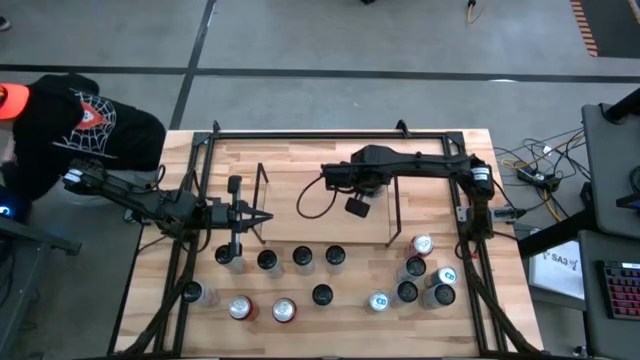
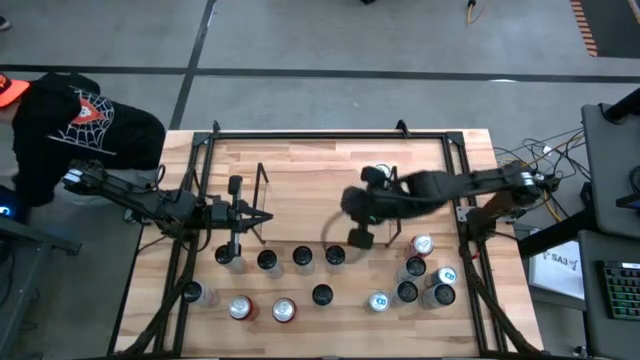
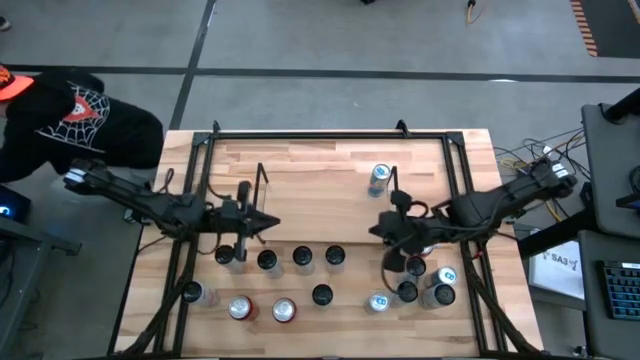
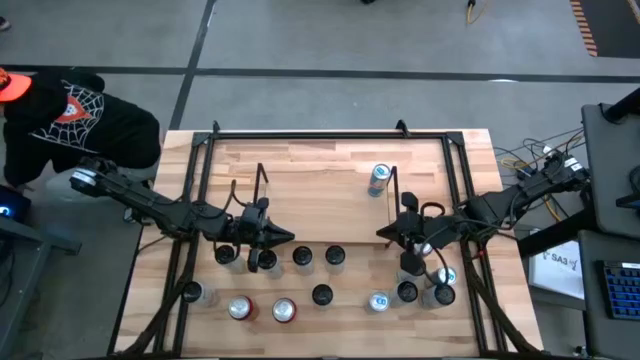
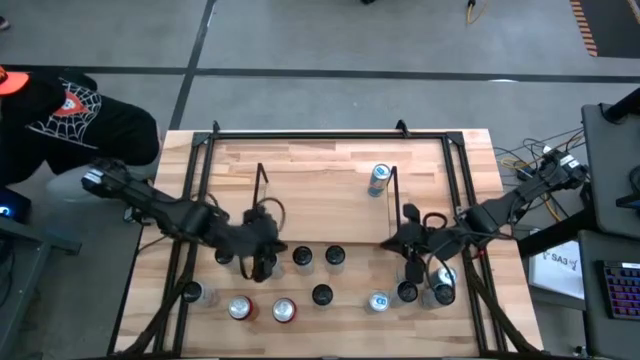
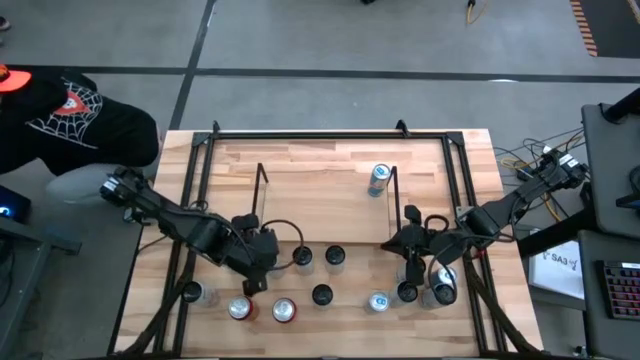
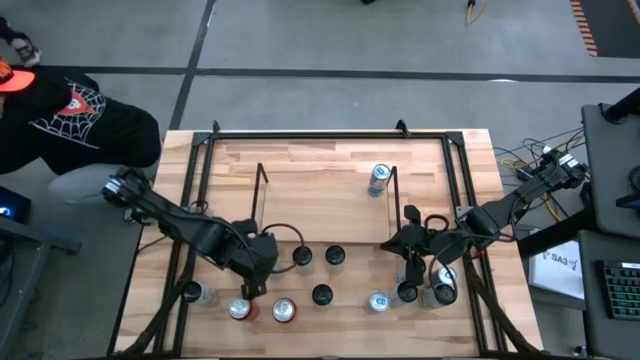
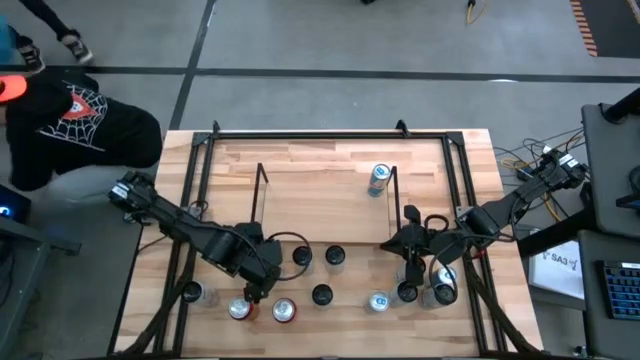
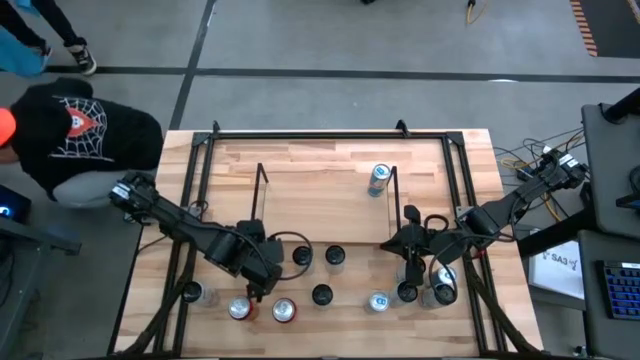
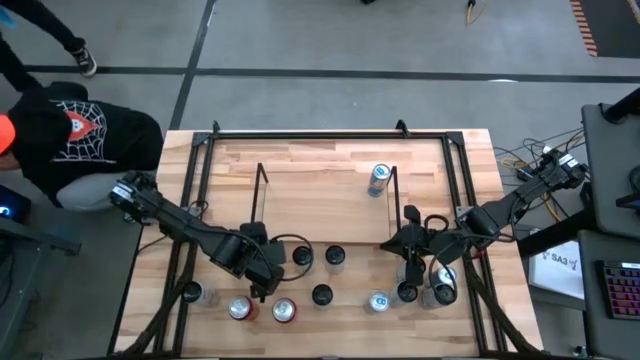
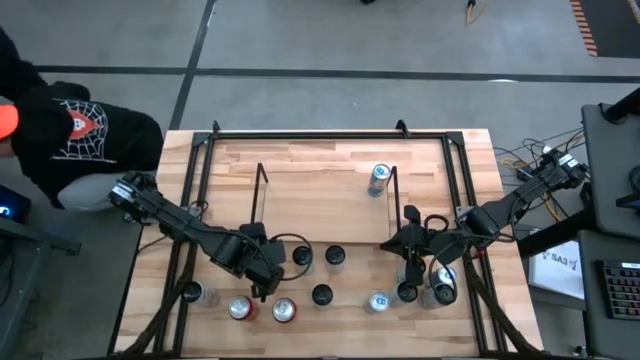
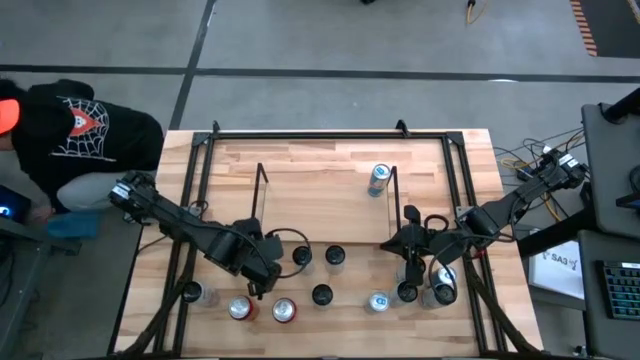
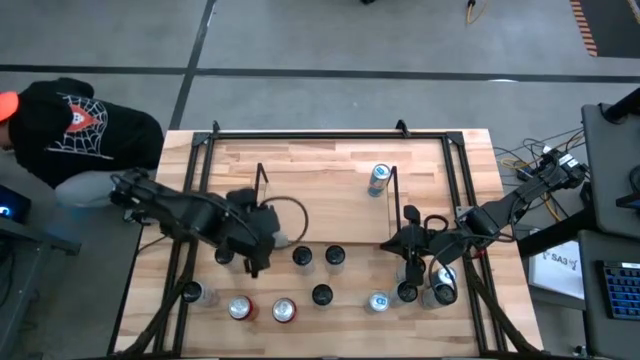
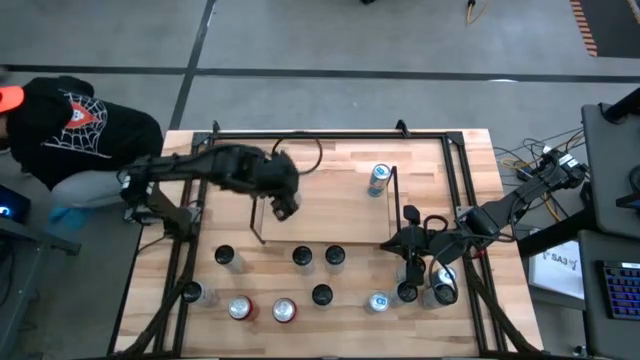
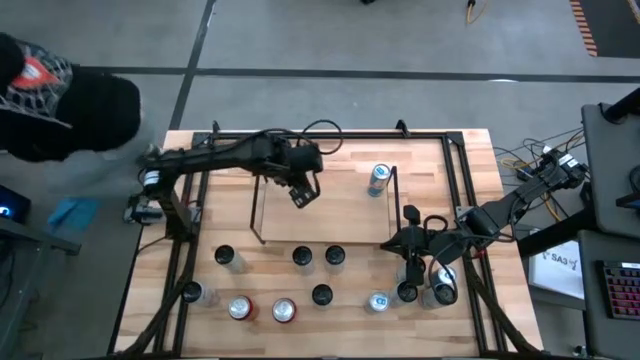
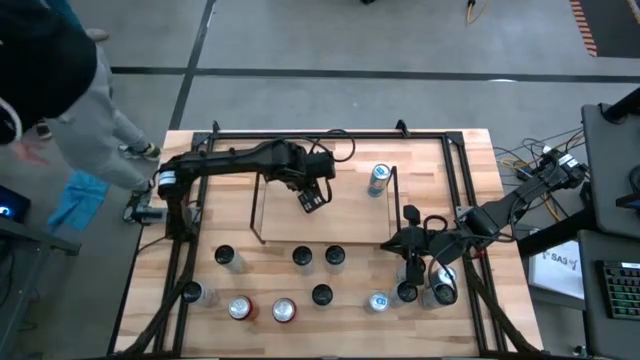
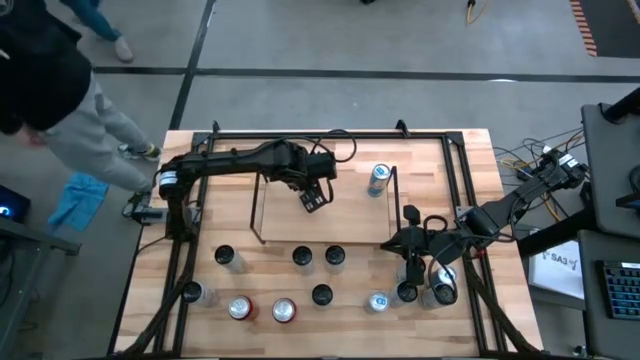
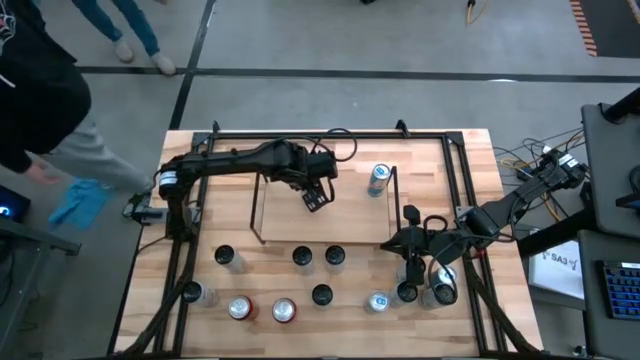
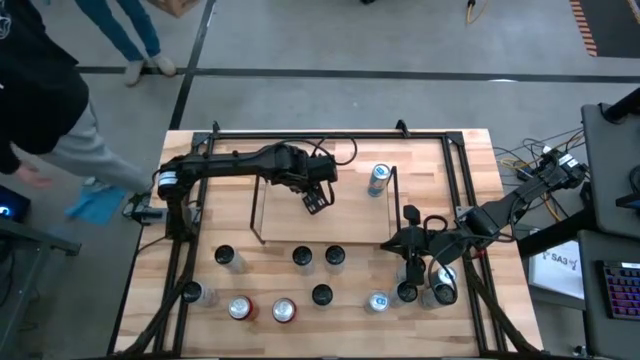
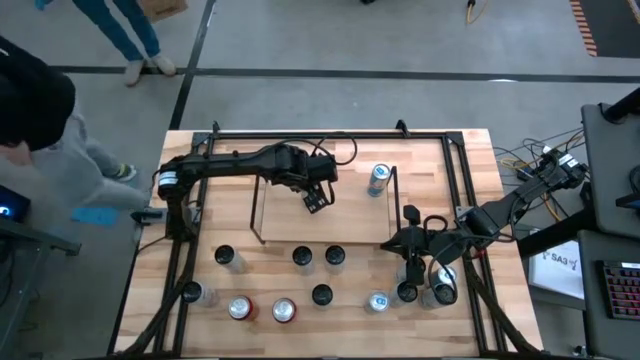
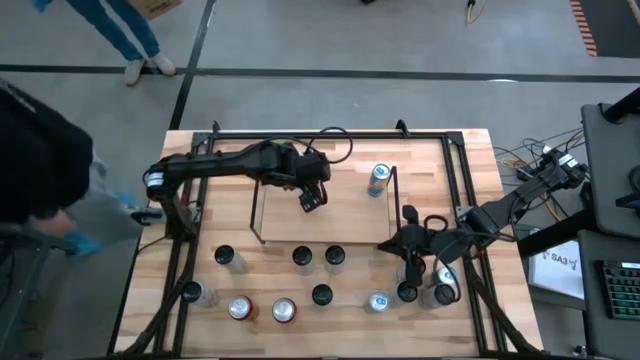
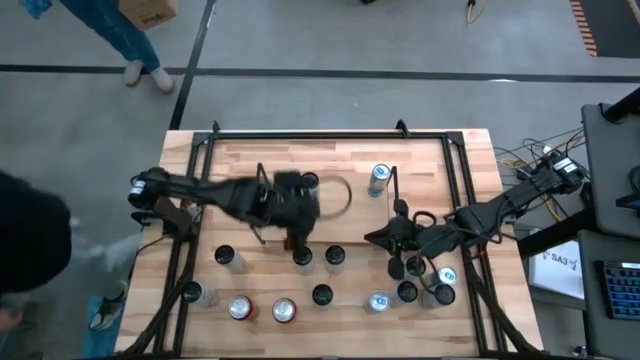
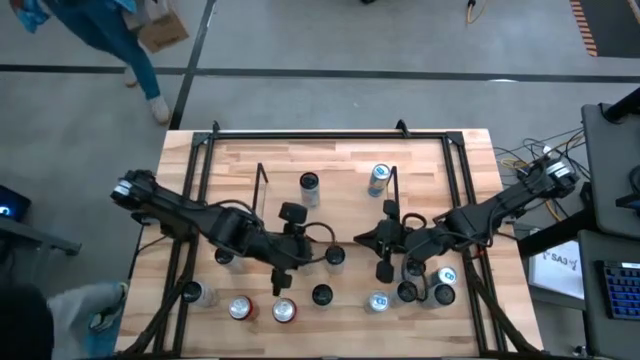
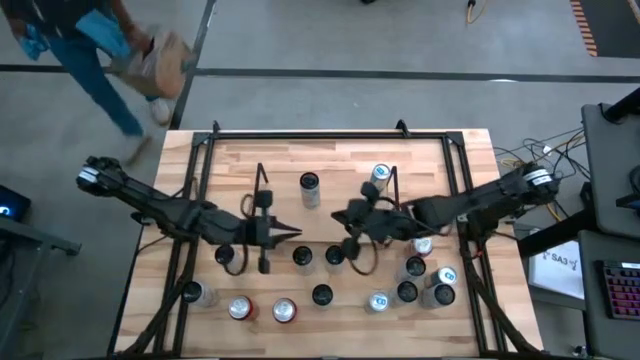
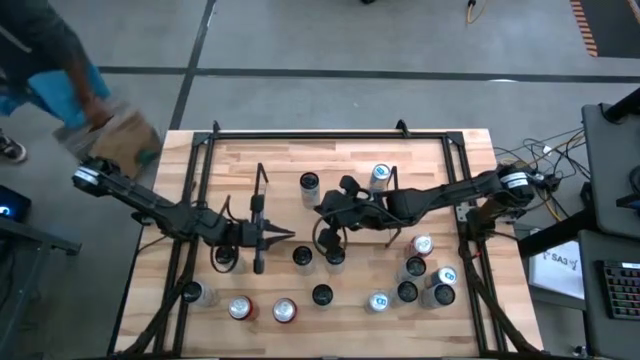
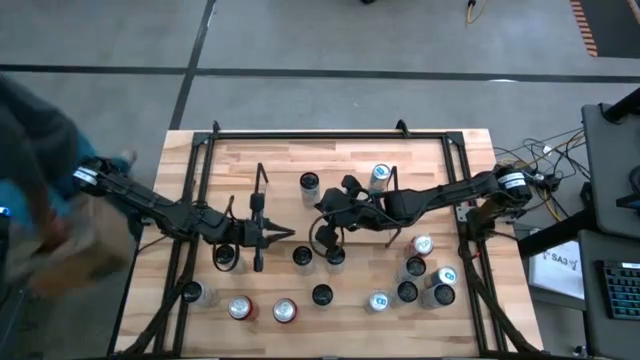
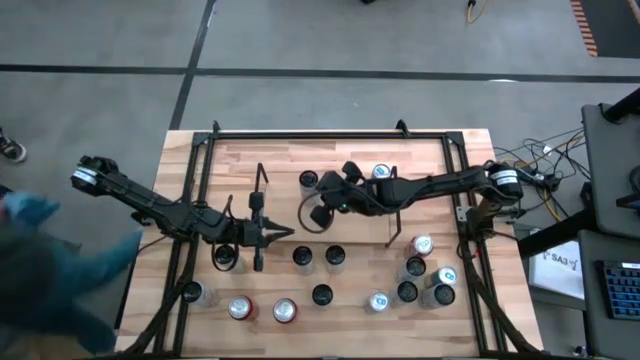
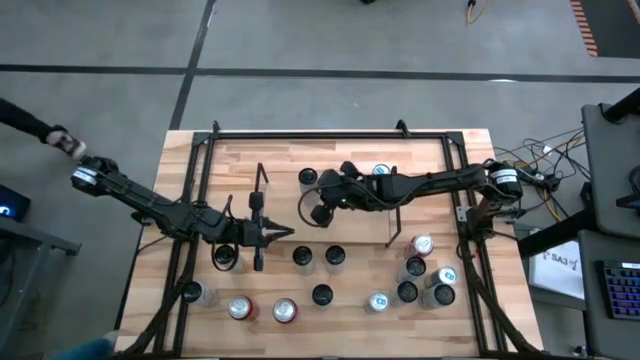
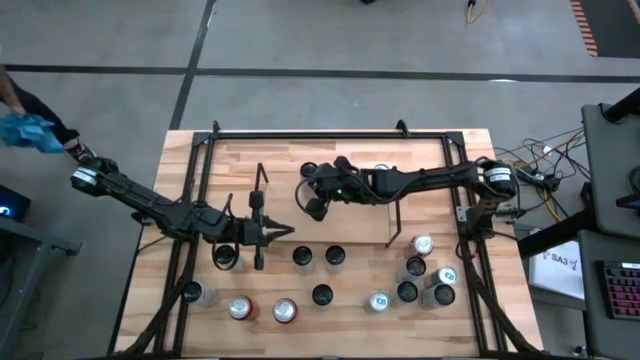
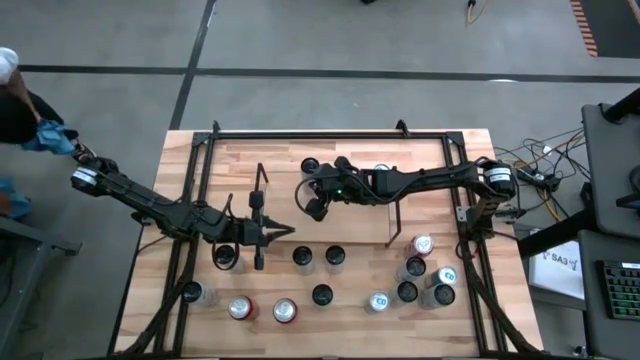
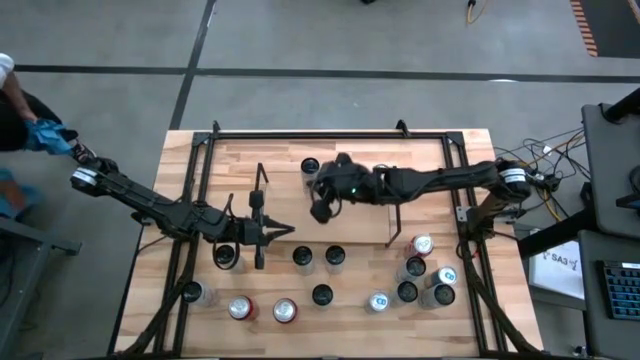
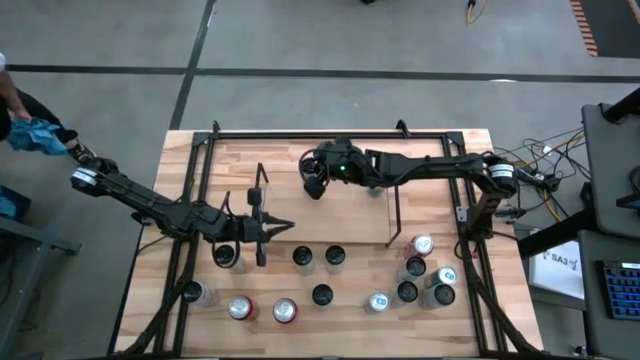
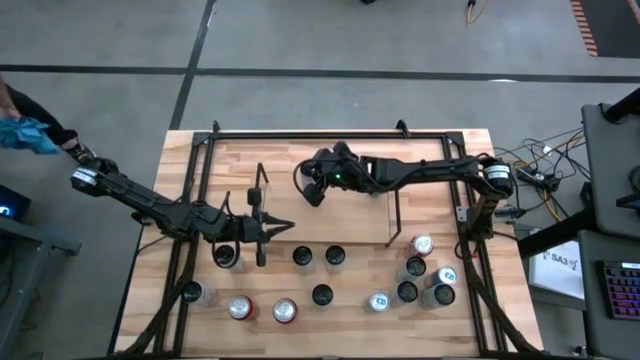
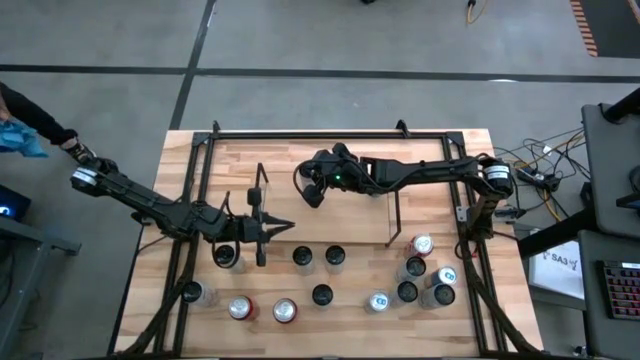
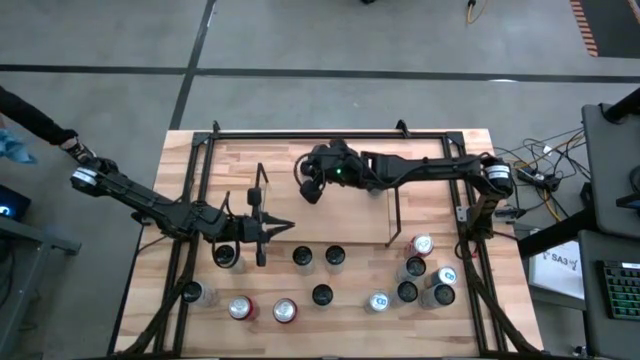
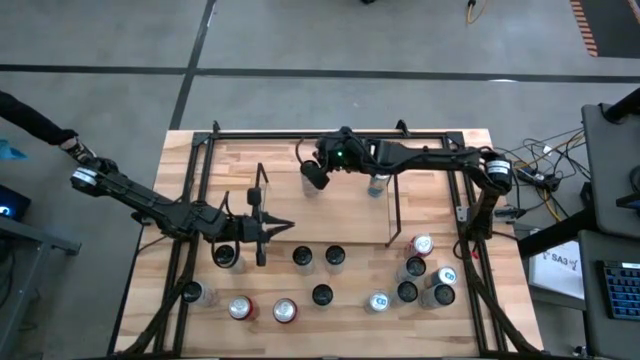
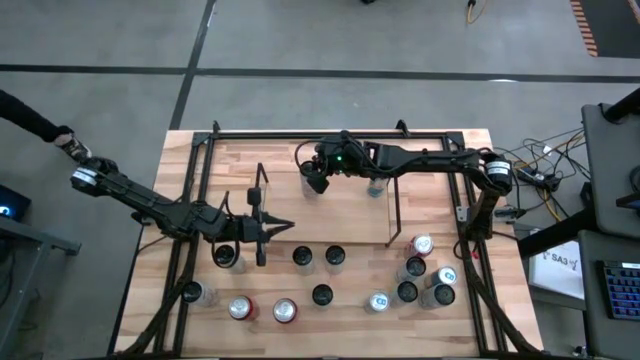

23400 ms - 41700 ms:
Task: Place canned beverage on shelf
Put the top white and pink soda can on the shelf
